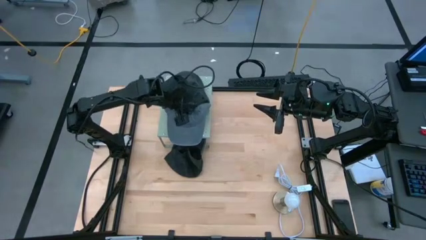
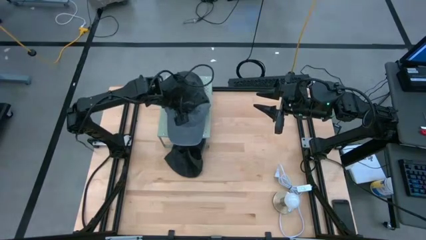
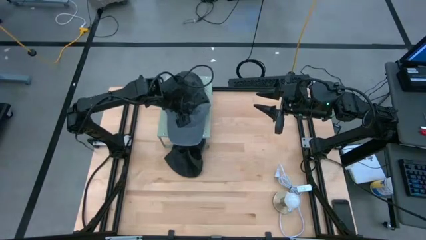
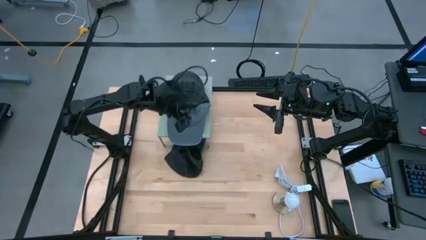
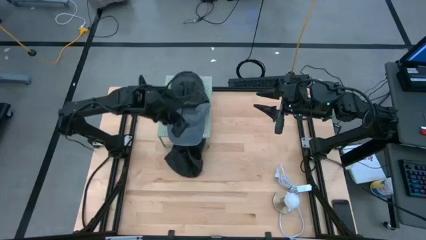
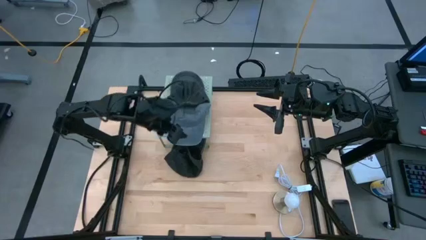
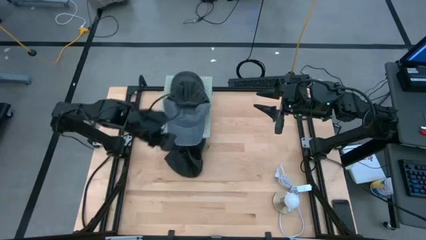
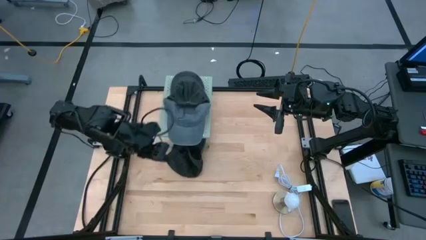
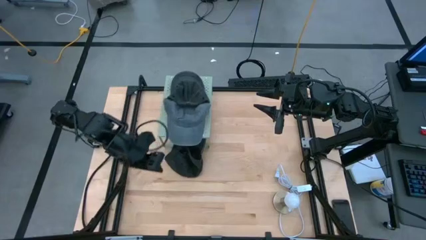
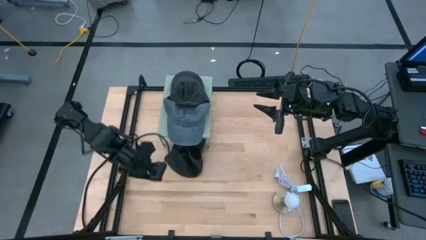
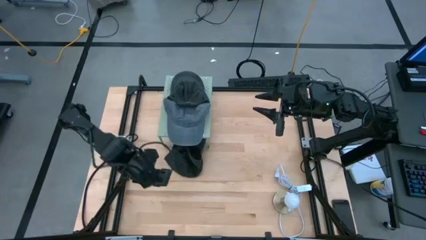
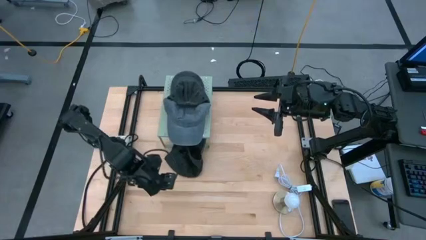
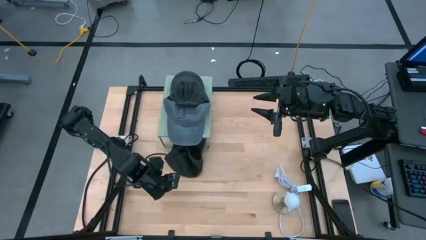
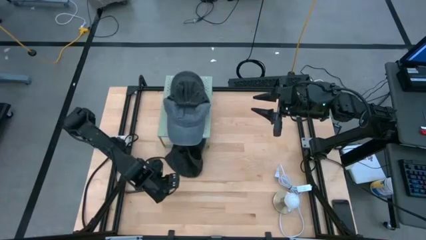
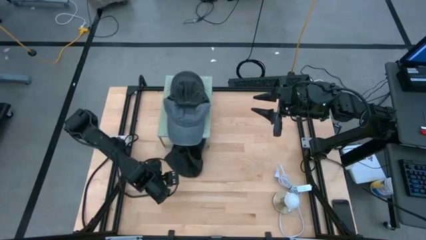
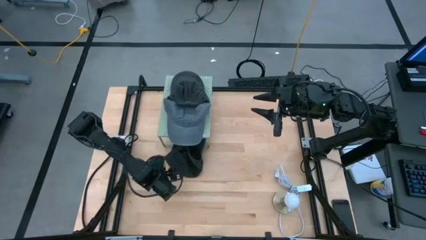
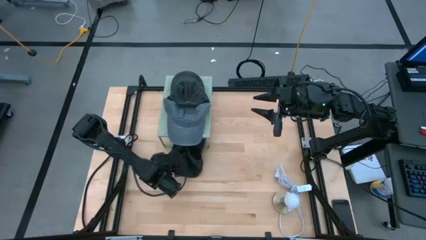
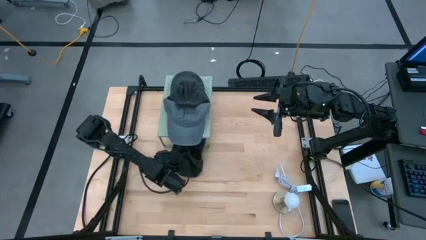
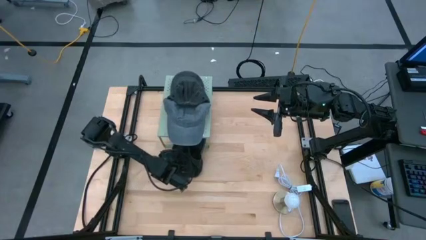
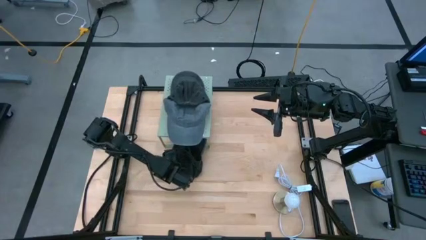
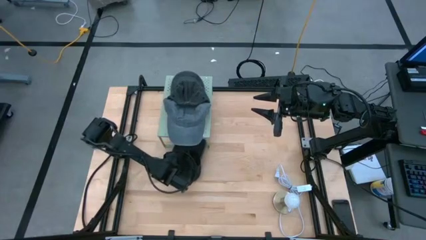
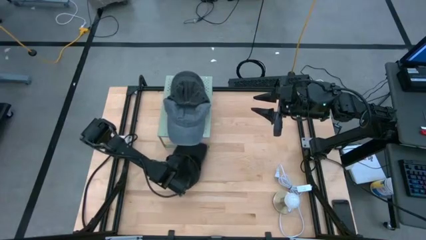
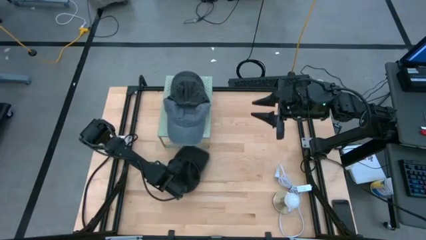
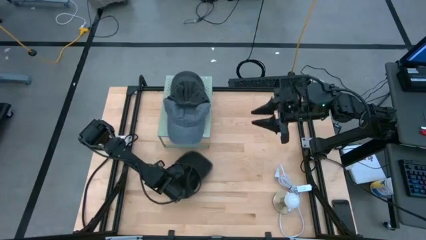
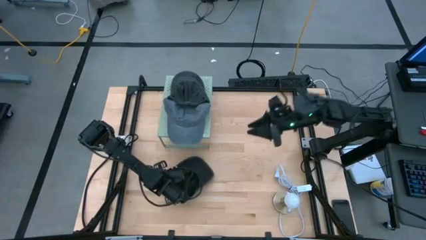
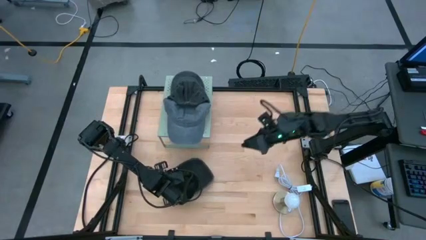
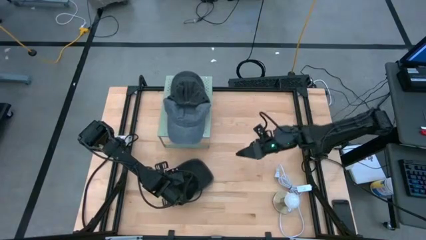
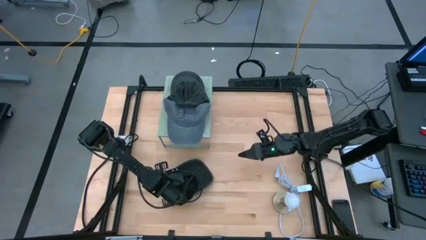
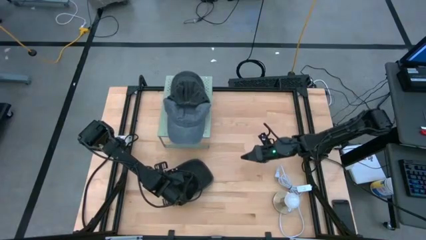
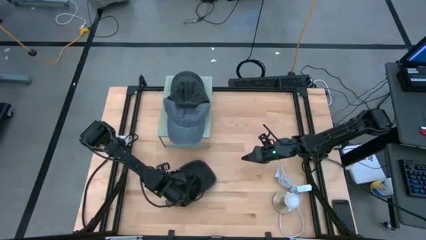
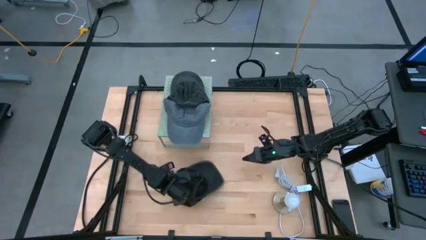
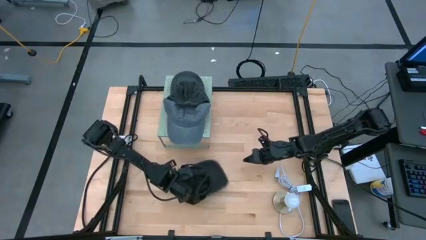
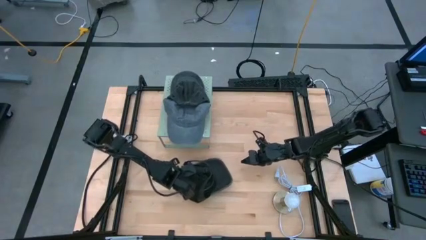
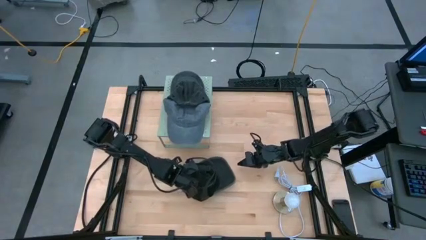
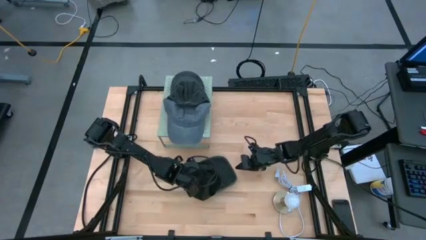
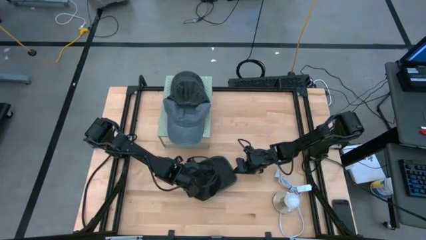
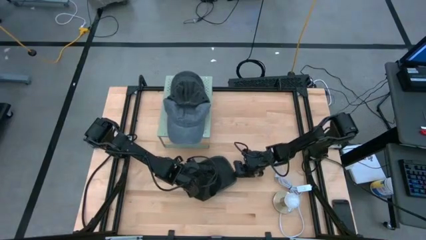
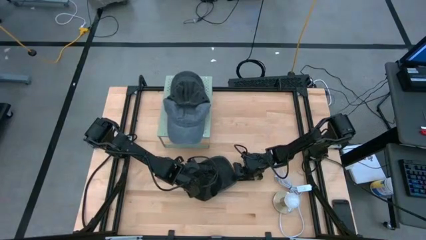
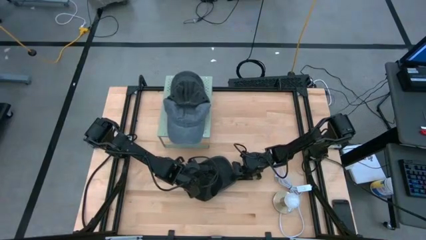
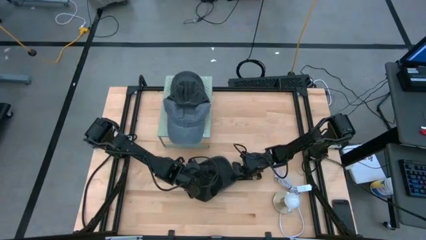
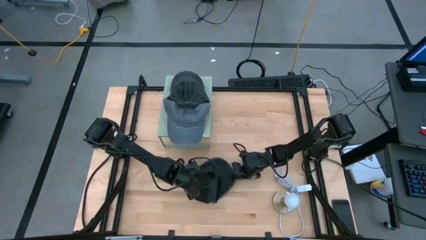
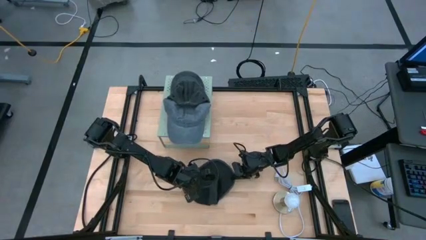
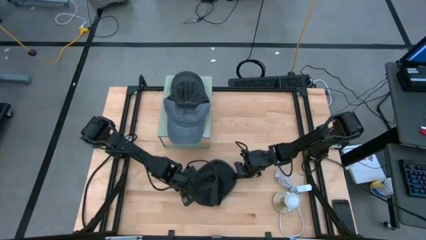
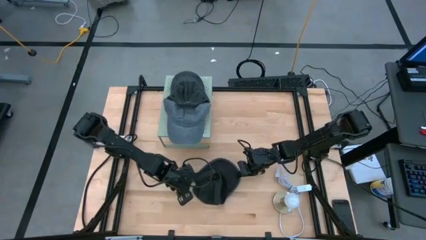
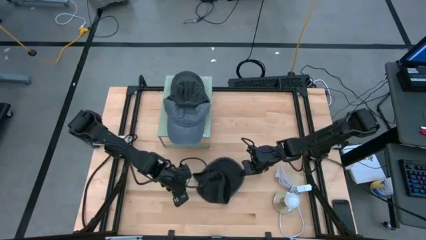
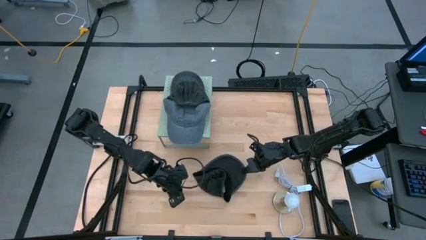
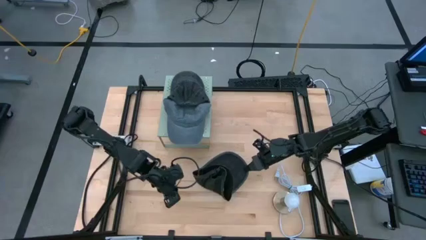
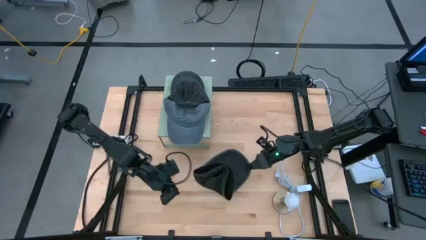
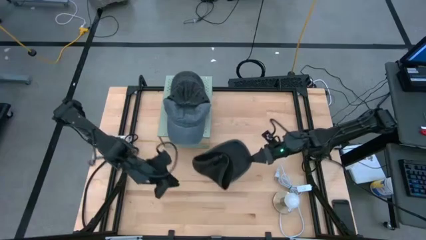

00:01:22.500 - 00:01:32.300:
Task: Pick & Place hat
Stack the black cap on the black cap on the shelf

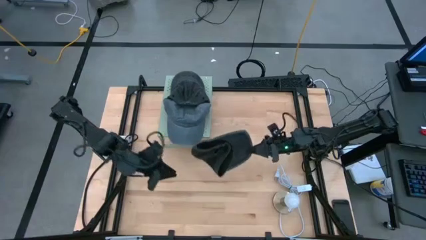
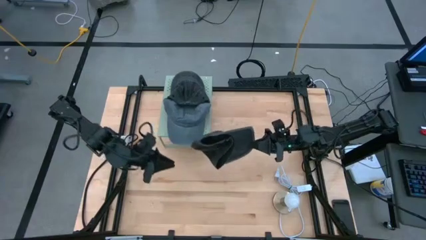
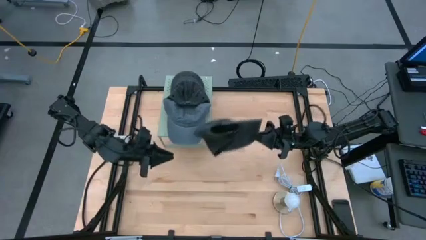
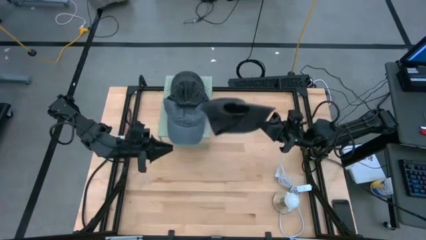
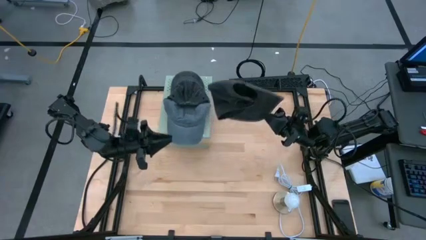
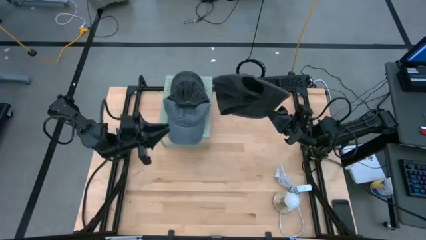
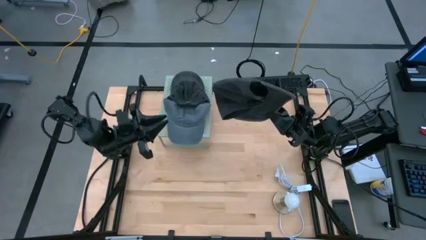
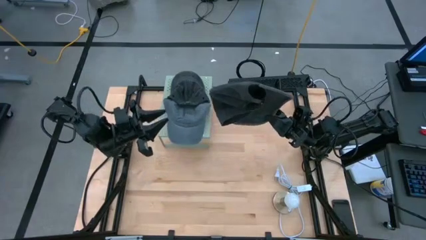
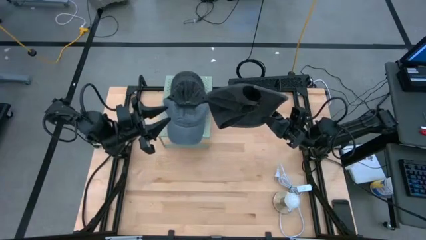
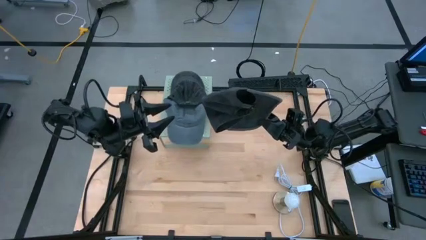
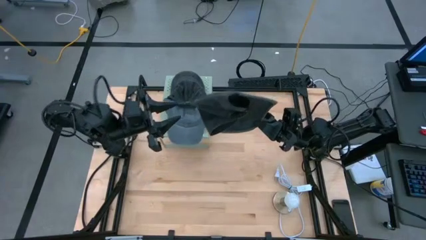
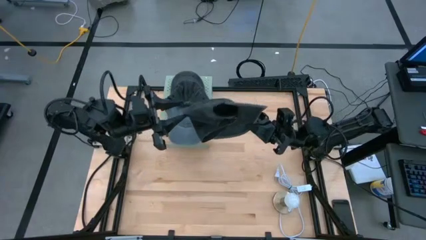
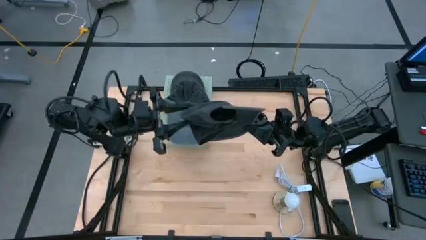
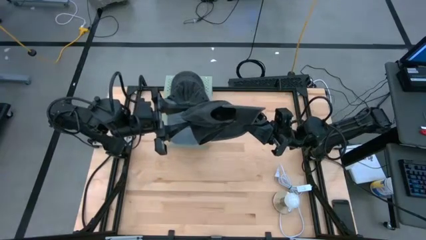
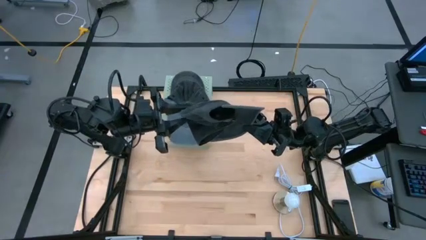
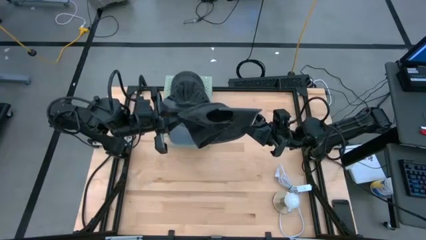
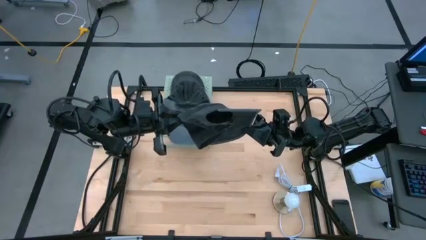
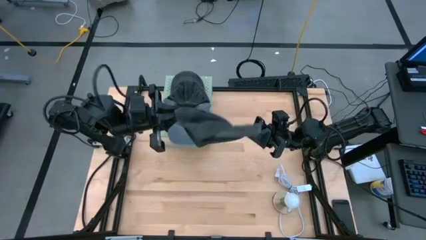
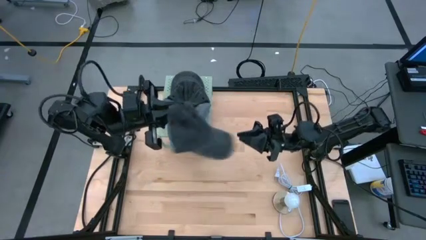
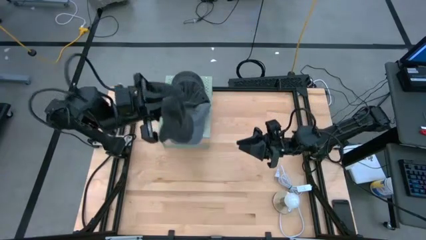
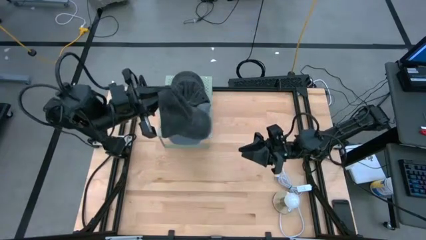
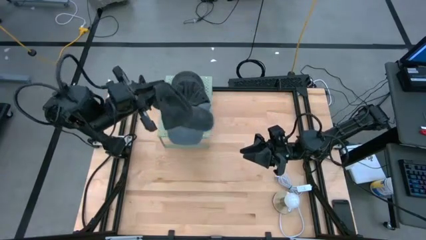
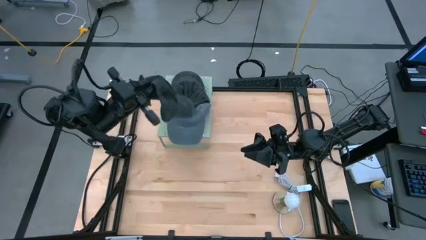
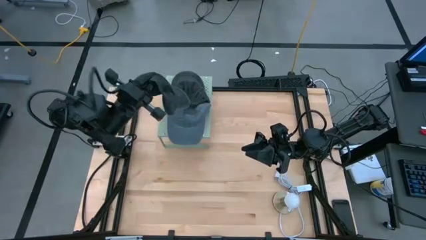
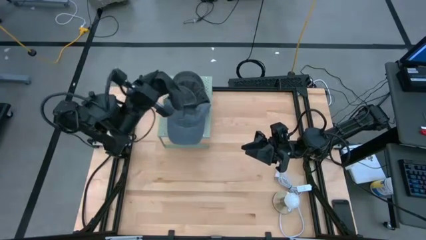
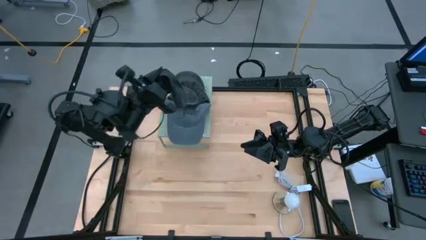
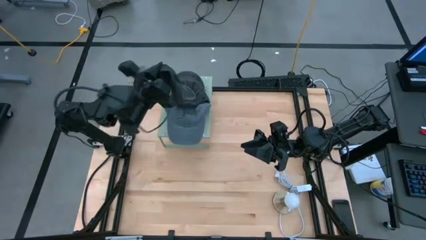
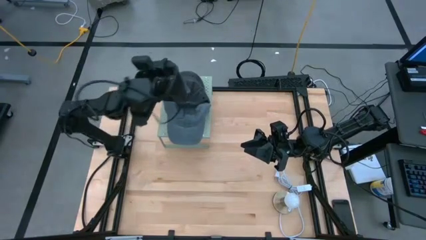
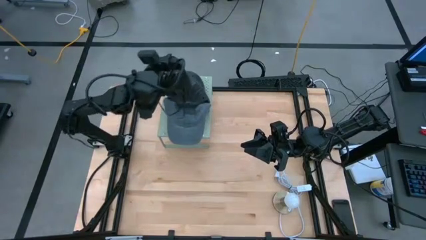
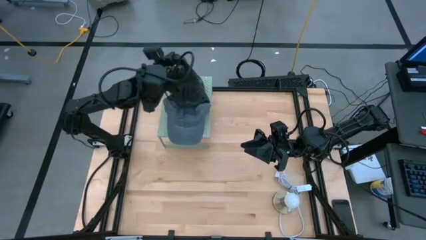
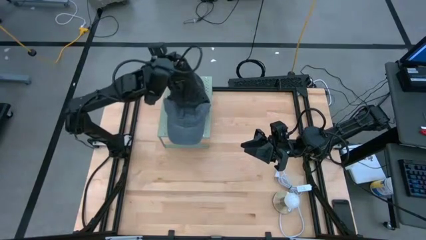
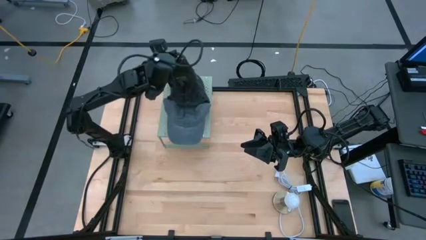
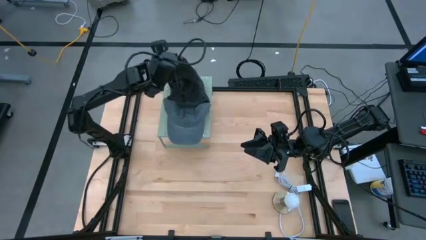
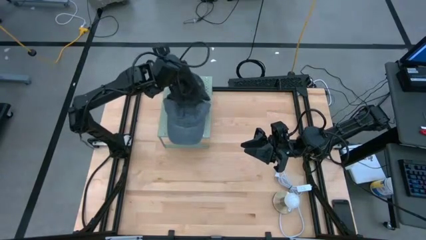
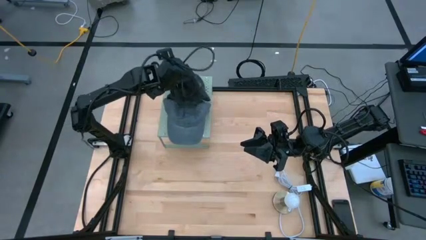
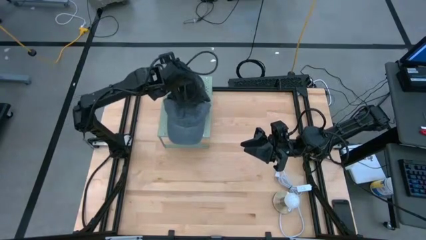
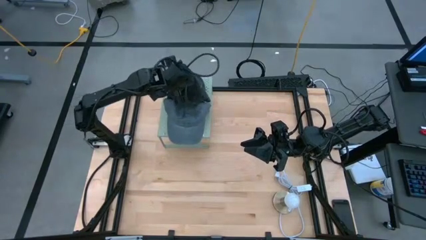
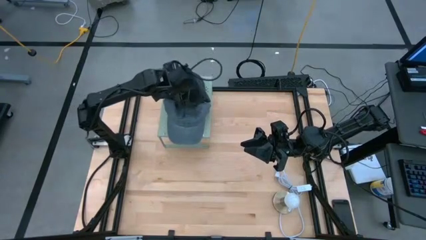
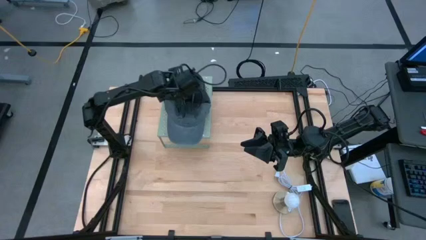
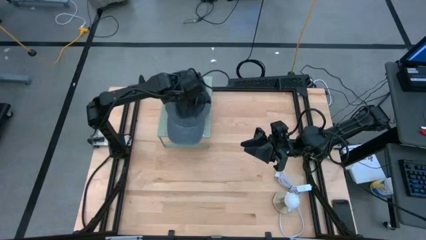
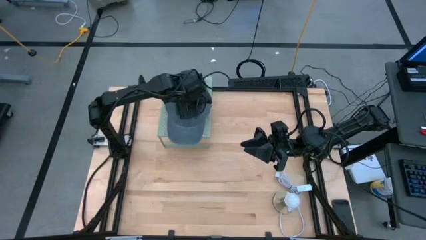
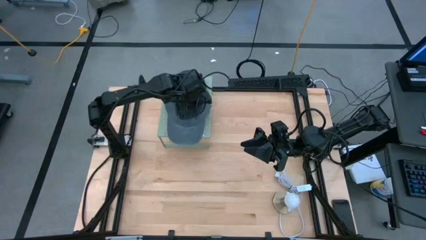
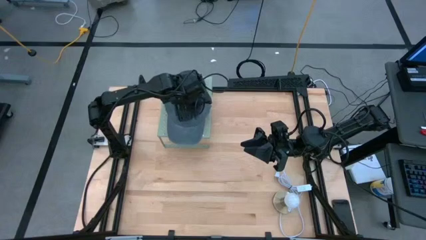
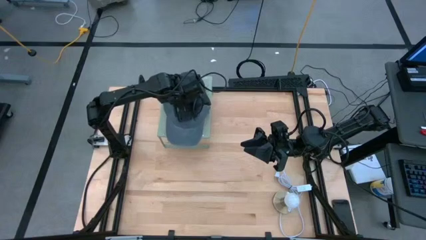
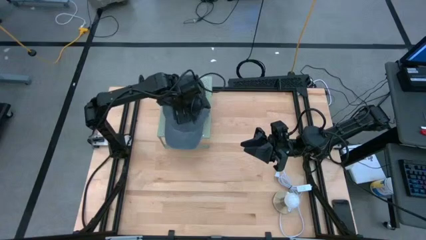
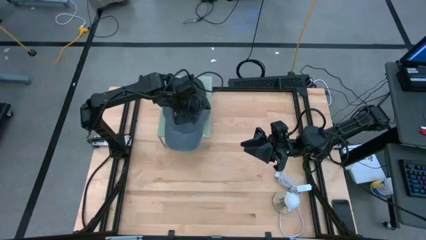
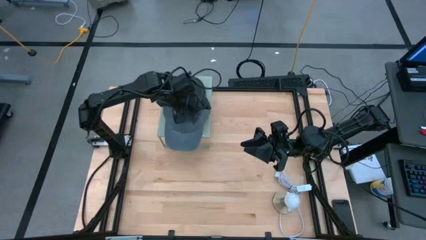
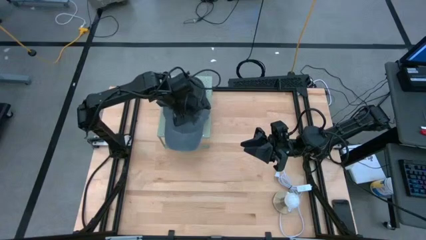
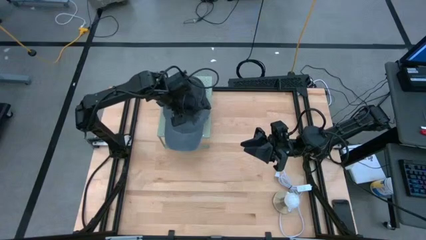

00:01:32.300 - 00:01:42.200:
Stack the black cap on the black cap on the shelf
